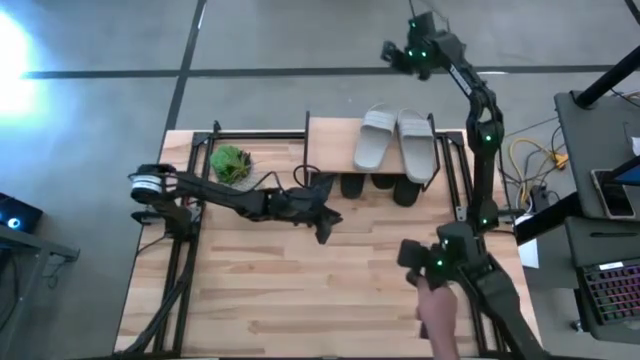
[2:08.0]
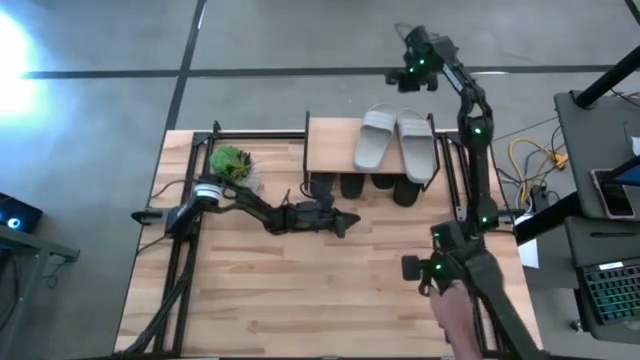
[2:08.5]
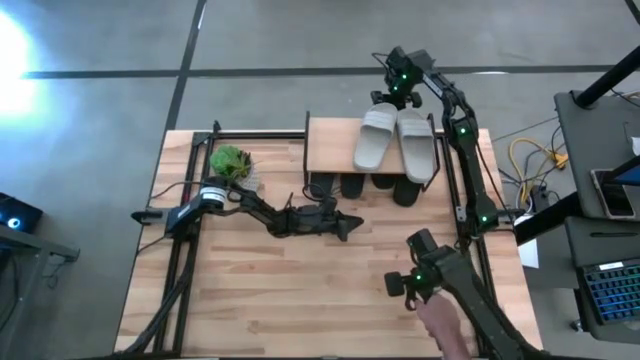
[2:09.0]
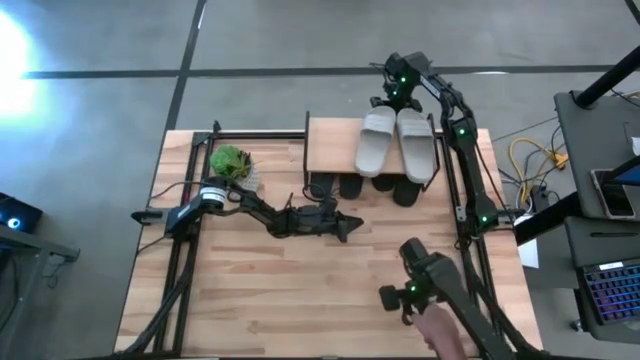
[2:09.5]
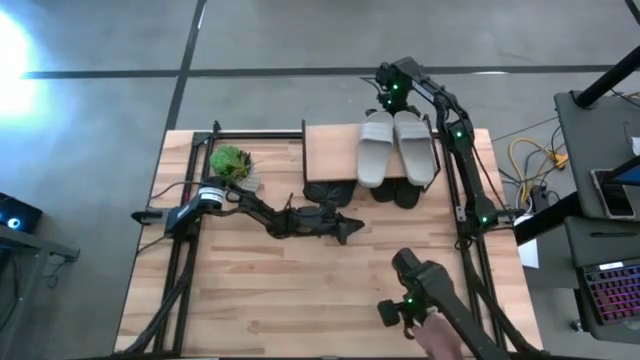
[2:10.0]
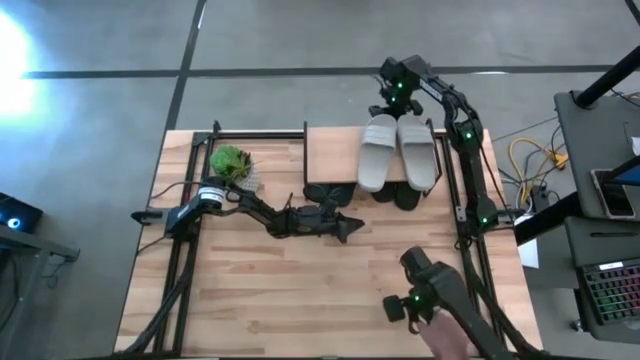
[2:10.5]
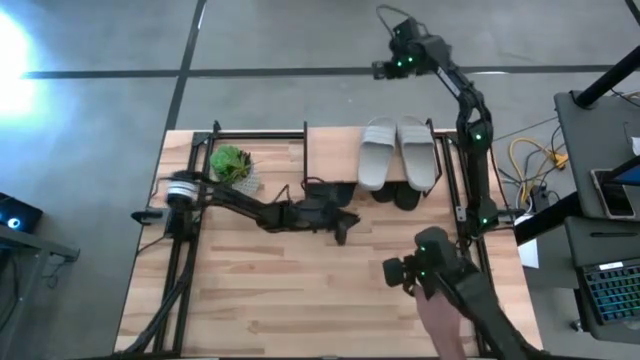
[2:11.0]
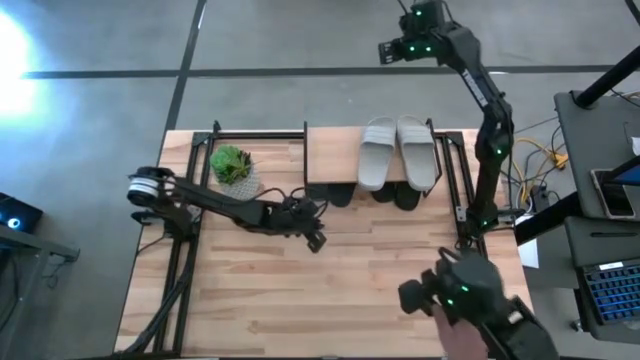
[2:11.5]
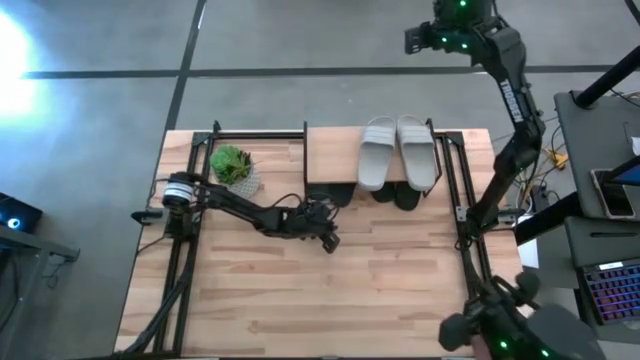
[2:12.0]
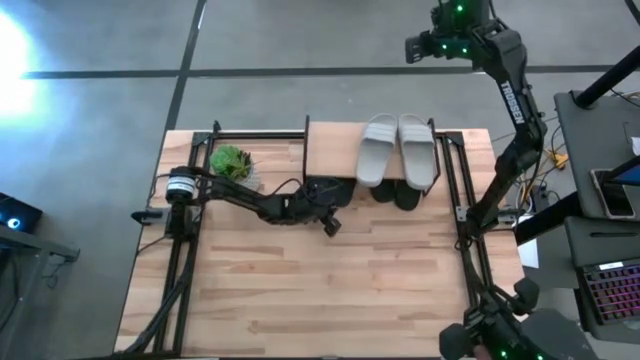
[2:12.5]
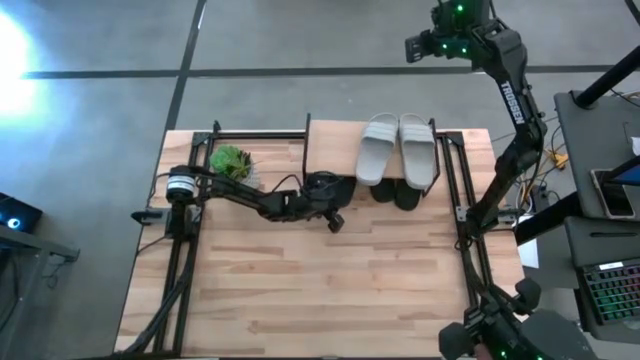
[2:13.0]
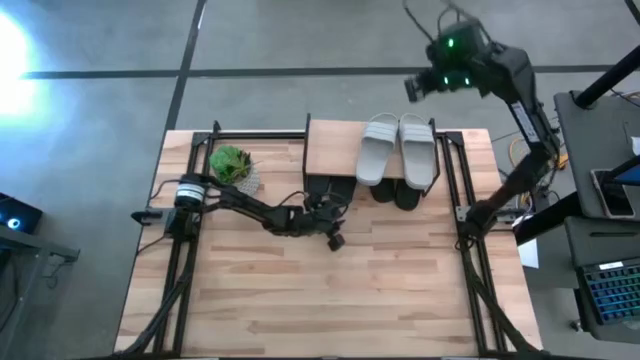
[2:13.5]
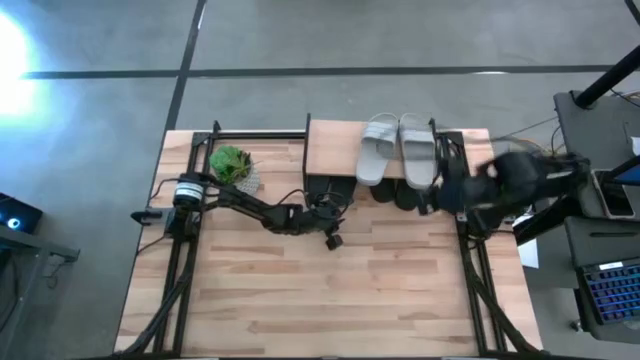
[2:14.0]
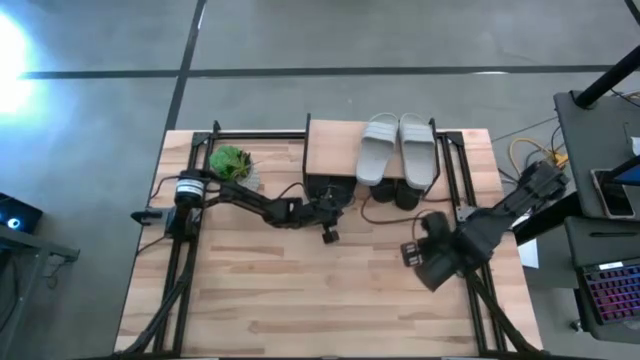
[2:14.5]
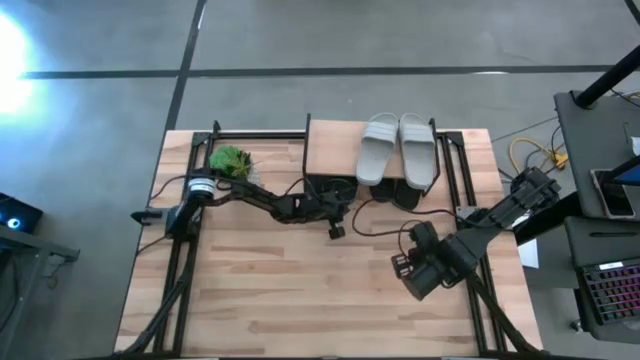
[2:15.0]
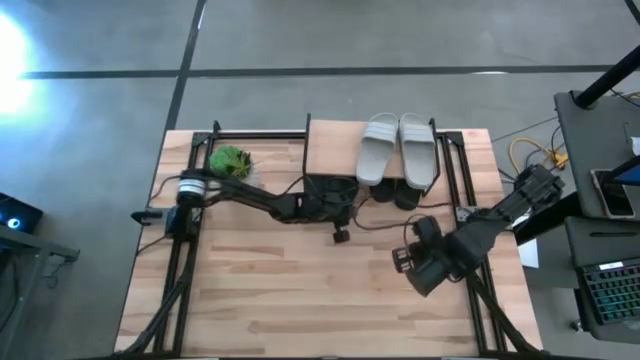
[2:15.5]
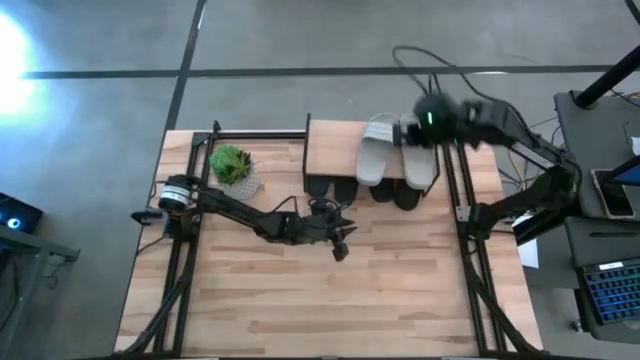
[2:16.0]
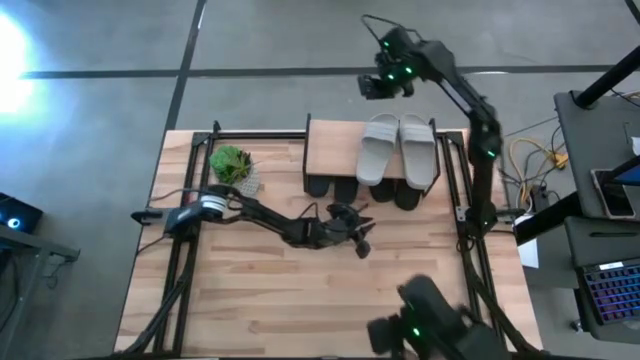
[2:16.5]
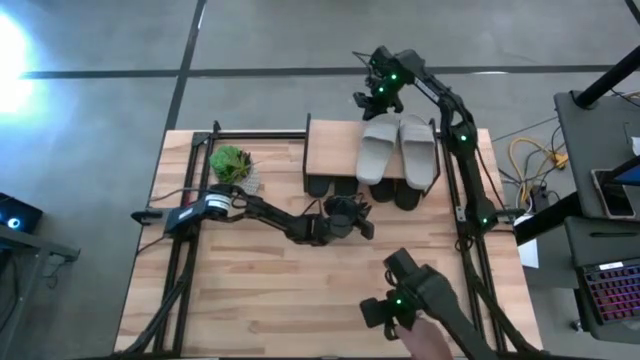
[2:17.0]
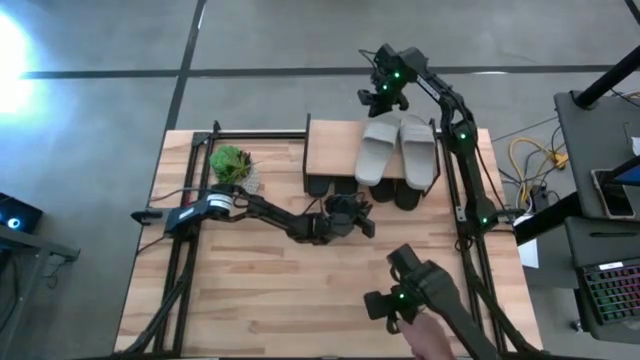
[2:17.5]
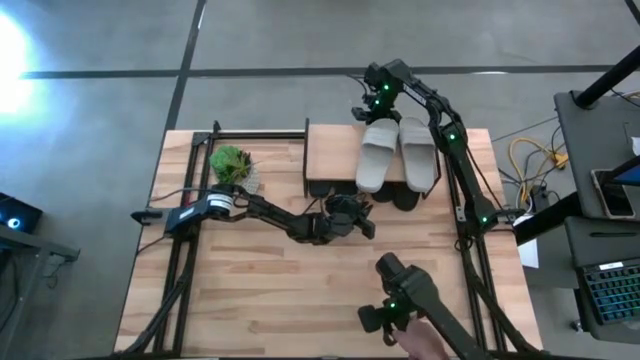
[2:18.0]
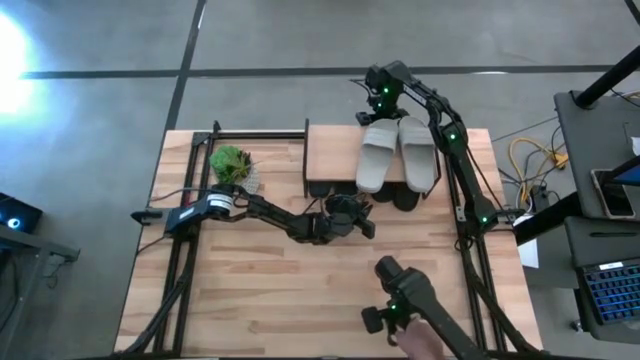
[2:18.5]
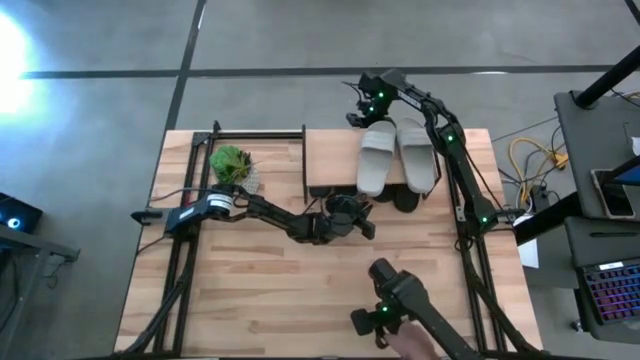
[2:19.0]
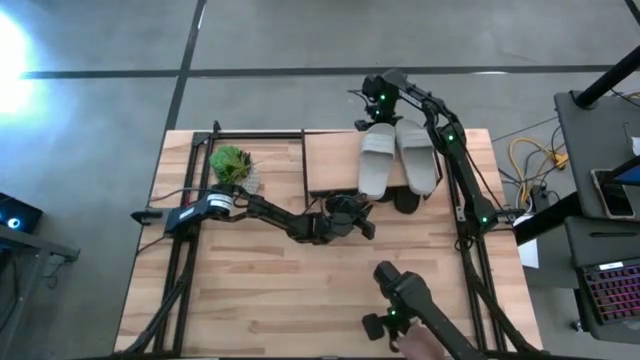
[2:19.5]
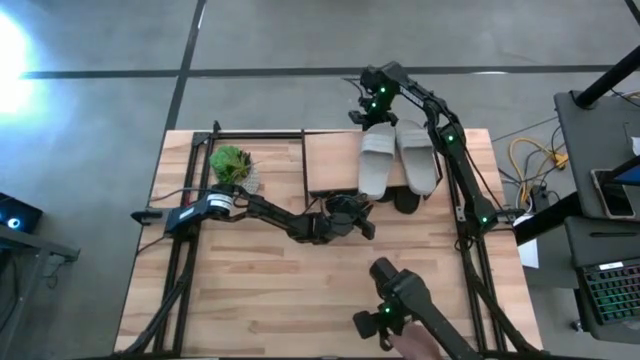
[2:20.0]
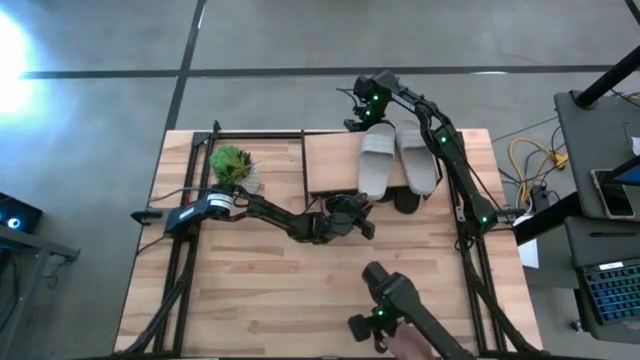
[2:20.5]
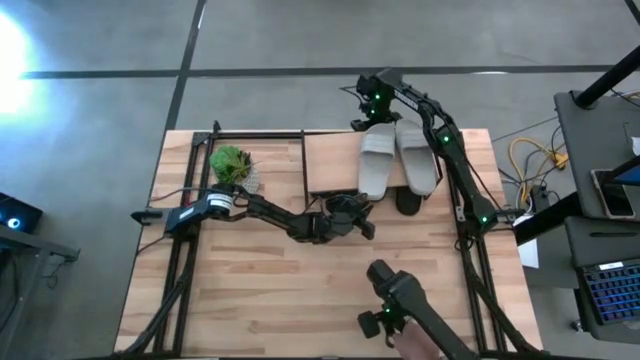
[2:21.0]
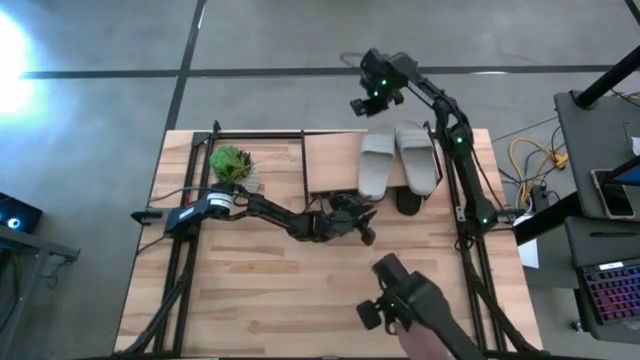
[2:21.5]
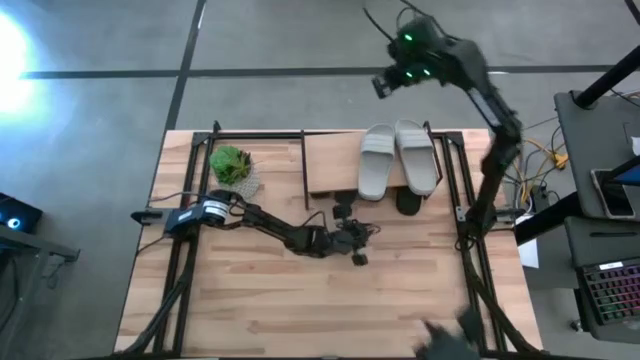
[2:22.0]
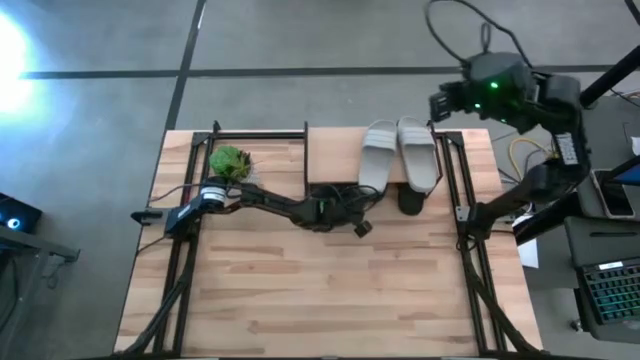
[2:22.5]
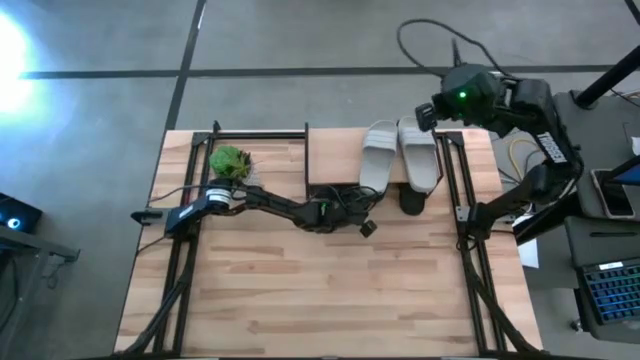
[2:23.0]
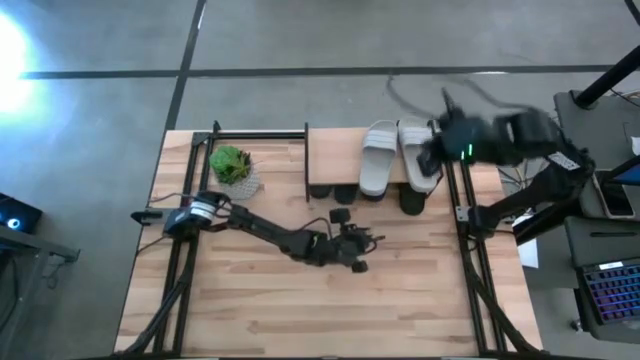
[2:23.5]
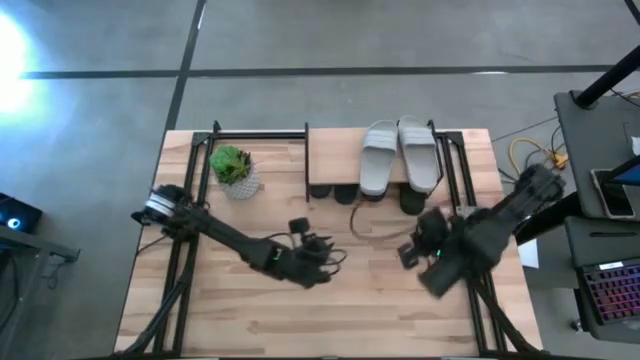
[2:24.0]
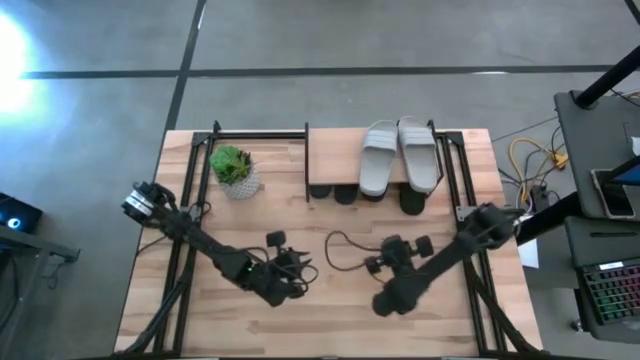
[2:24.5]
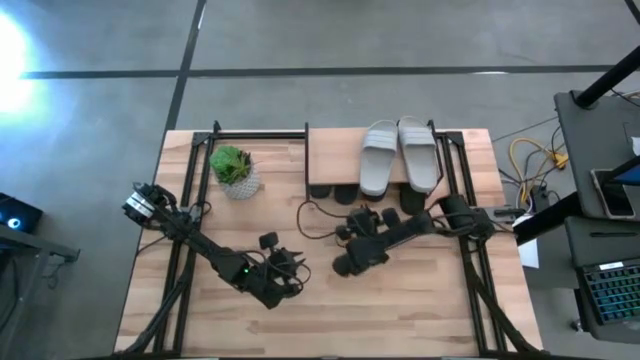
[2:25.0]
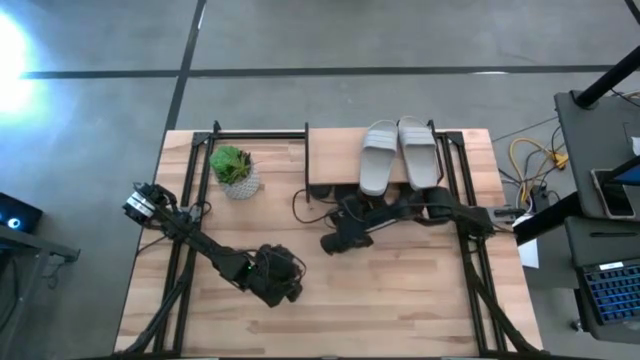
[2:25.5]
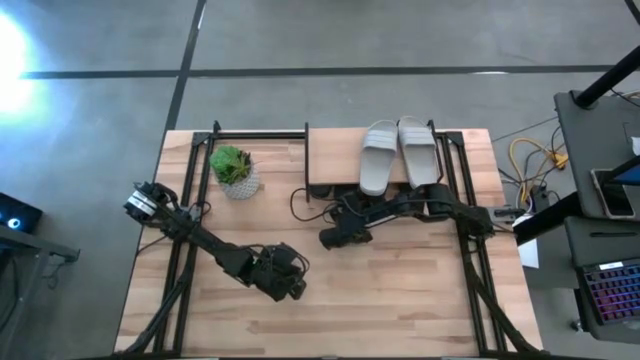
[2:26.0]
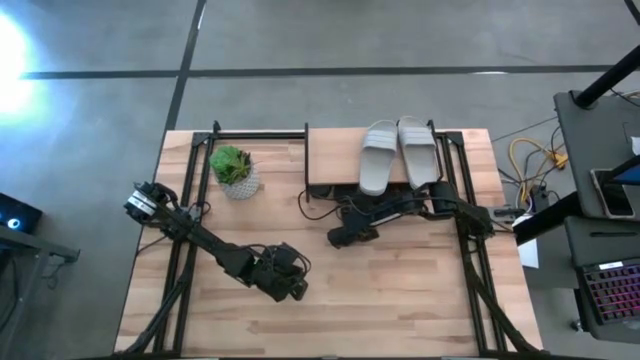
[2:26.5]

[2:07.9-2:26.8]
Task: Pick and place slides into the shelf
Put the black slipper under the shelf

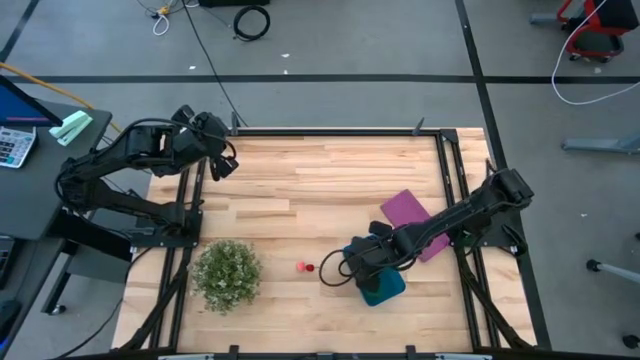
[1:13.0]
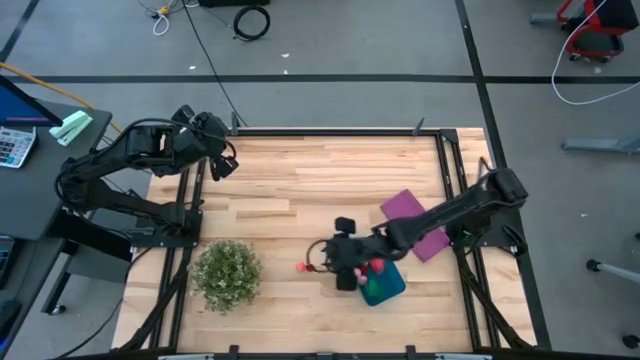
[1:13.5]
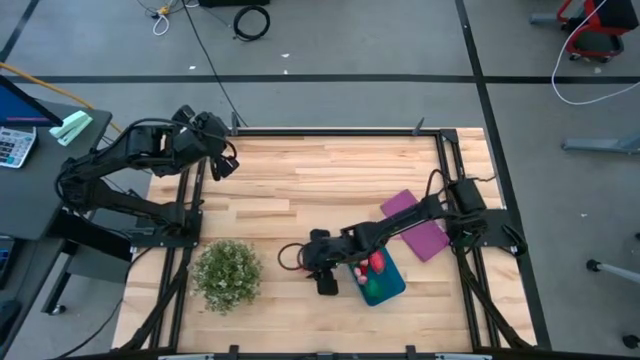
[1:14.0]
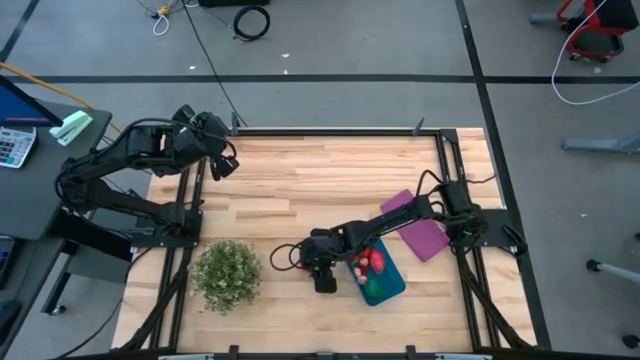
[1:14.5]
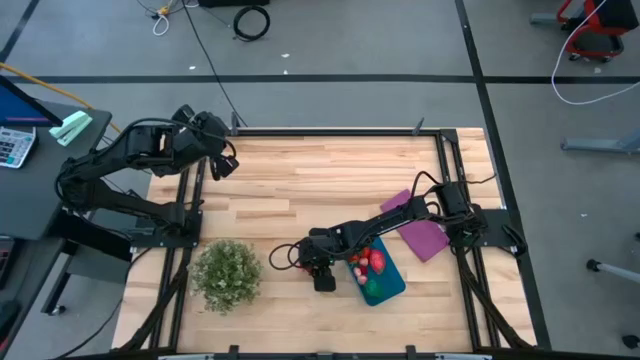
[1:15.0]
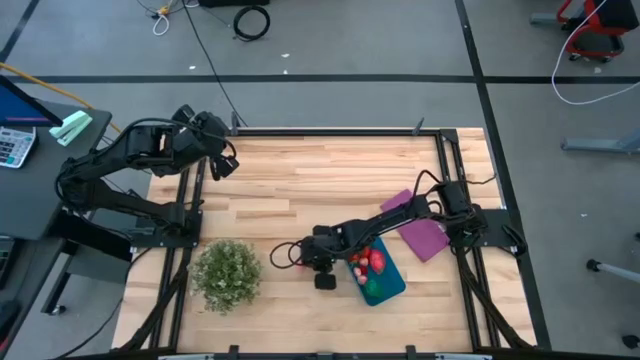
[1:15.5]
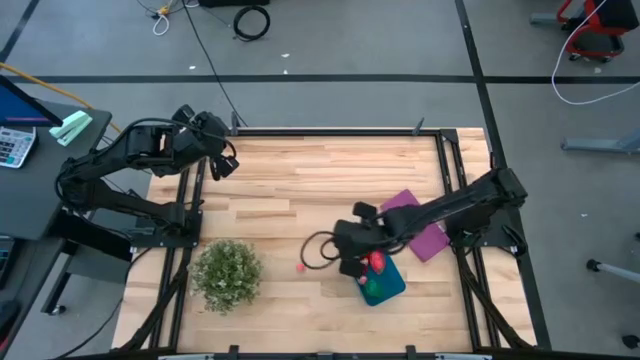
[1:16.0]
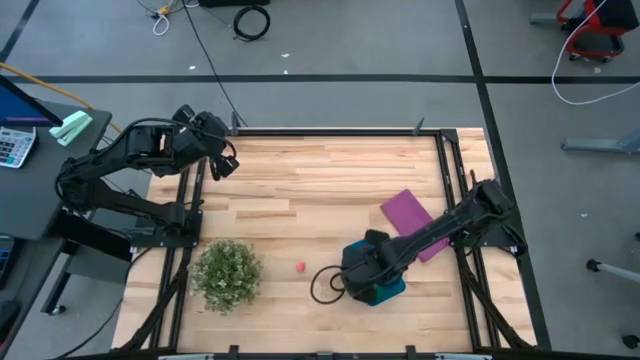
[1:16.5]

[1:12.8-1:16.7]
Task: Pick and placing Produce into tupperware
Put the red cherry into the blue bin
